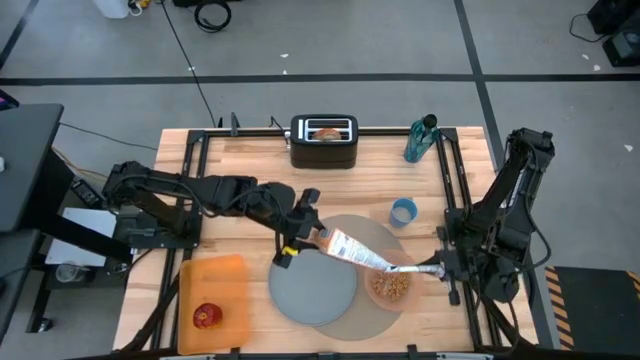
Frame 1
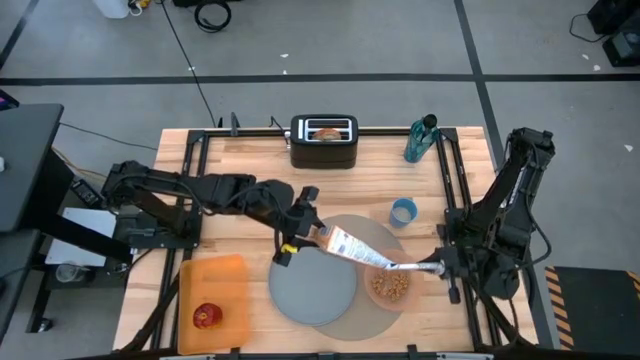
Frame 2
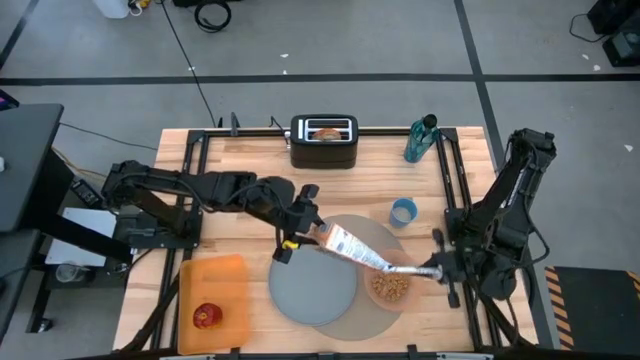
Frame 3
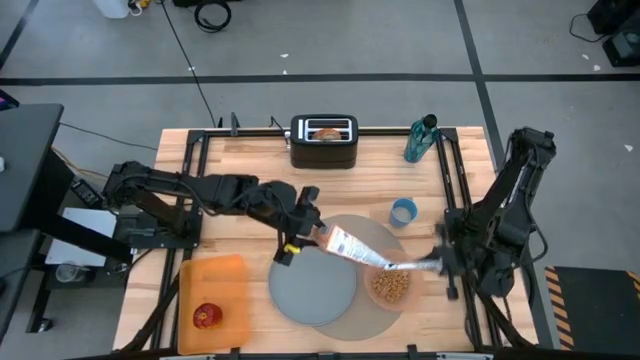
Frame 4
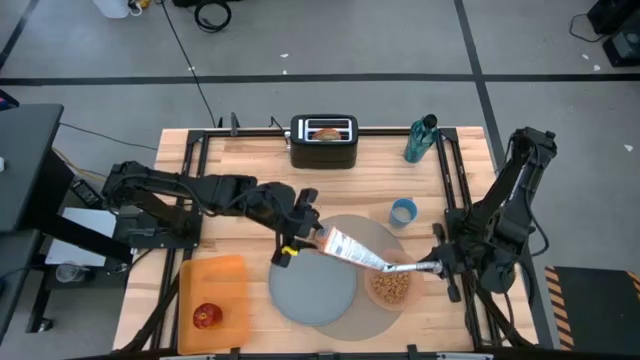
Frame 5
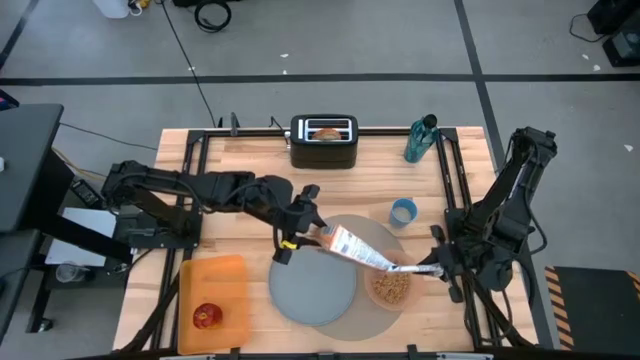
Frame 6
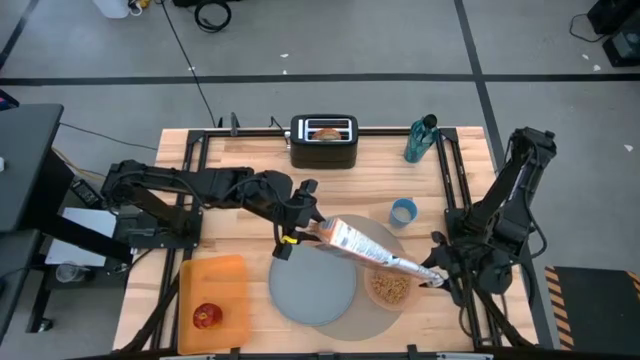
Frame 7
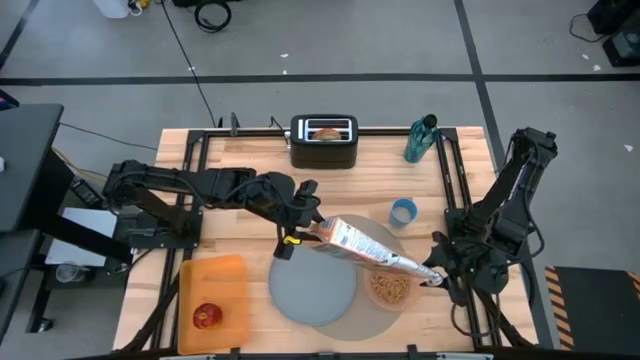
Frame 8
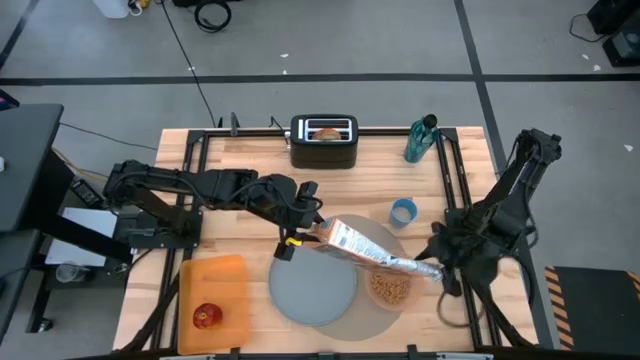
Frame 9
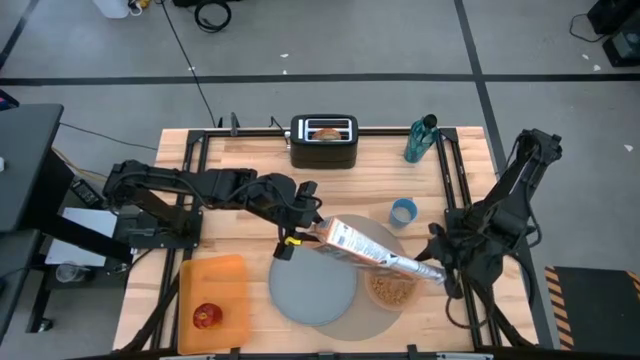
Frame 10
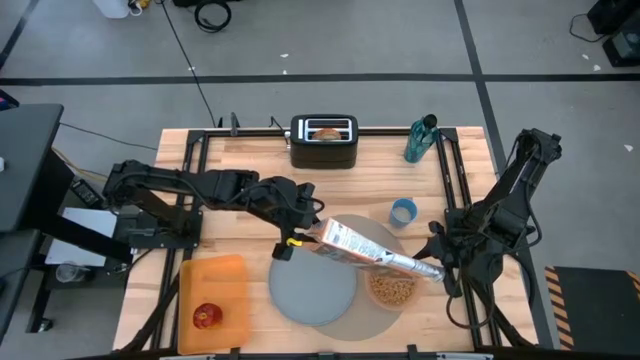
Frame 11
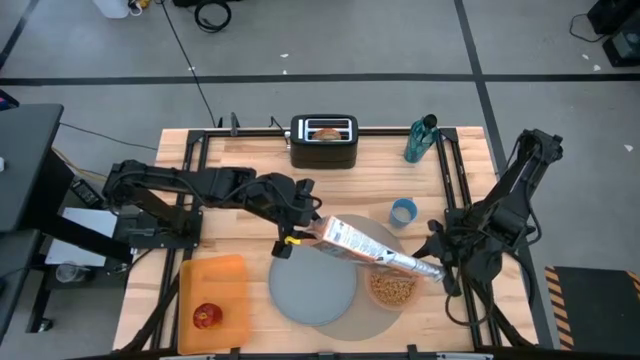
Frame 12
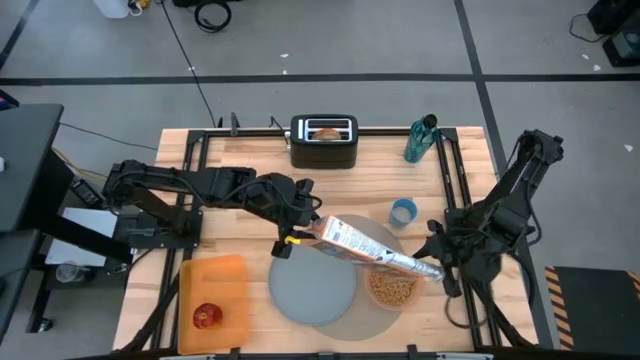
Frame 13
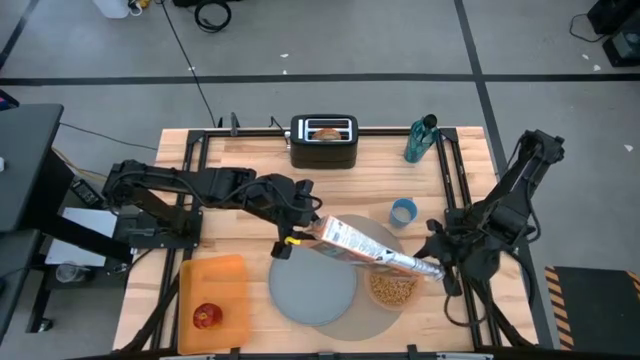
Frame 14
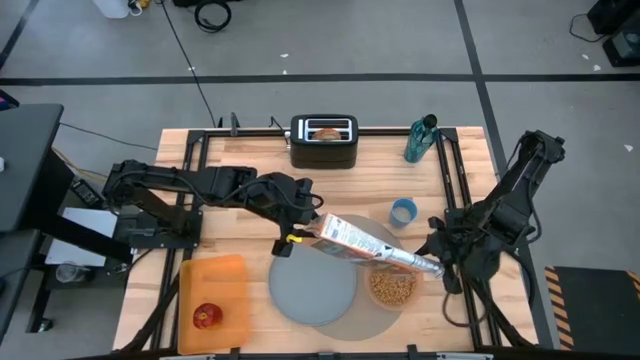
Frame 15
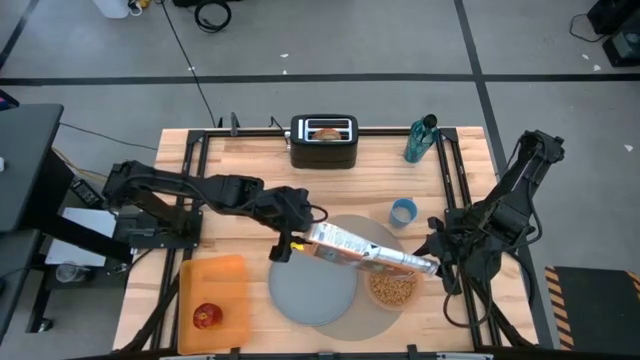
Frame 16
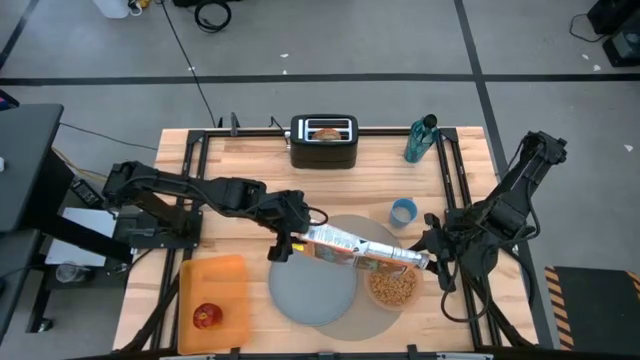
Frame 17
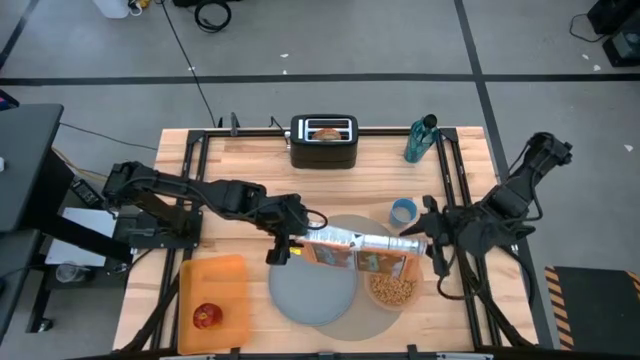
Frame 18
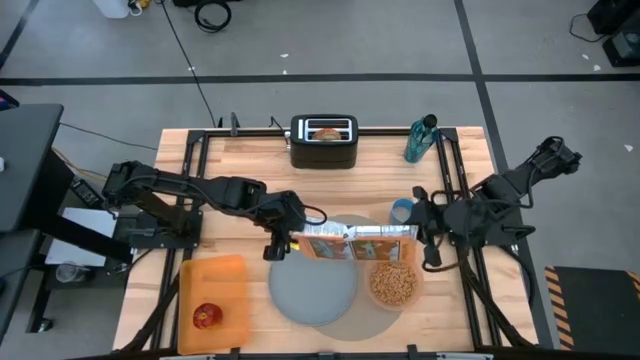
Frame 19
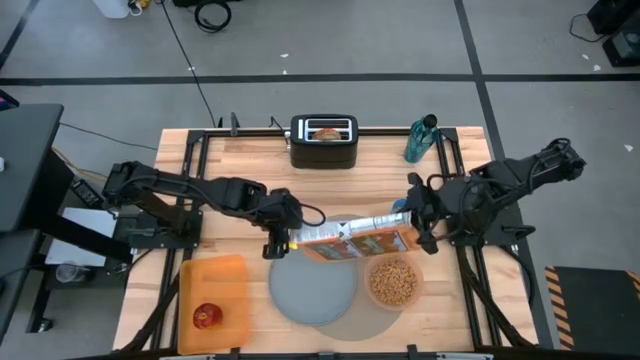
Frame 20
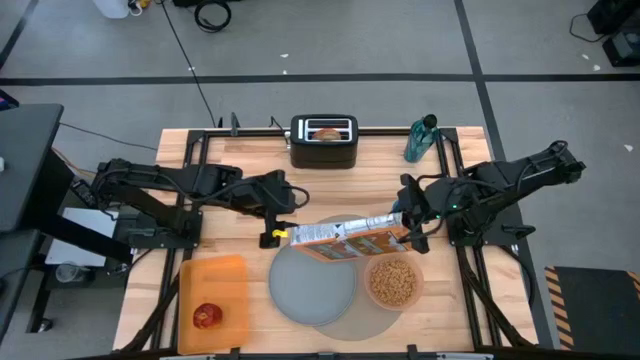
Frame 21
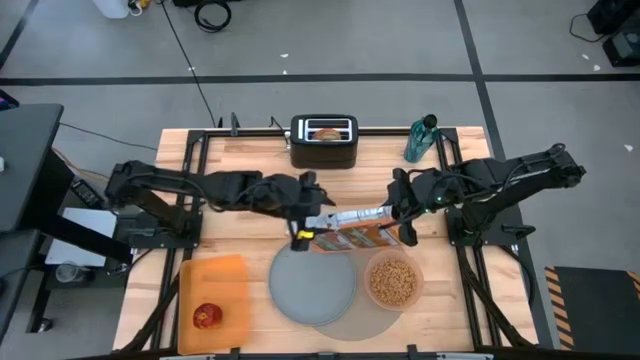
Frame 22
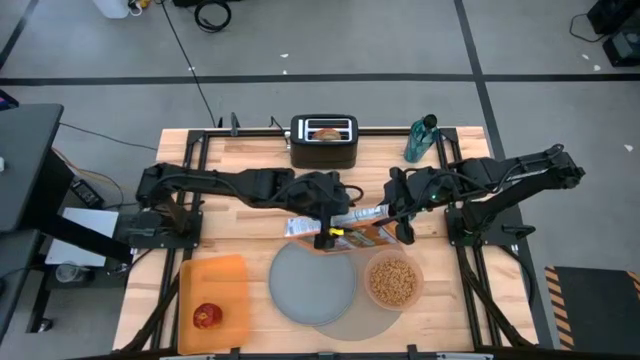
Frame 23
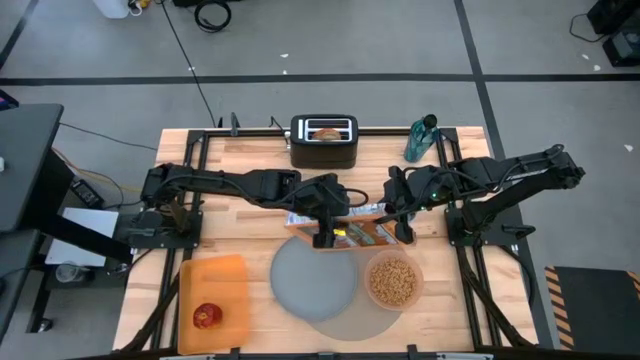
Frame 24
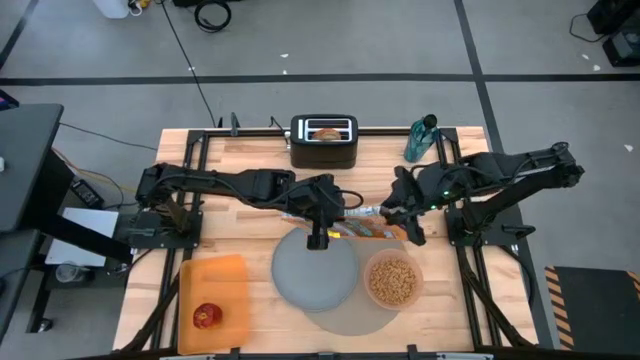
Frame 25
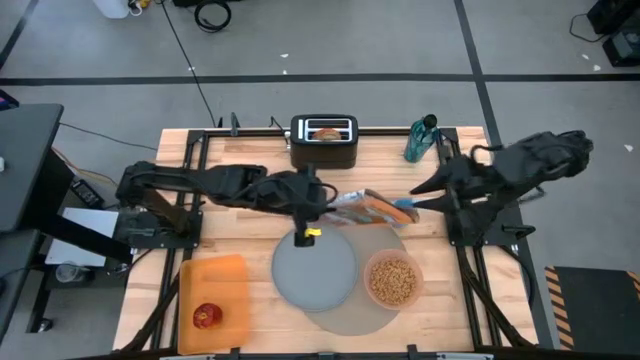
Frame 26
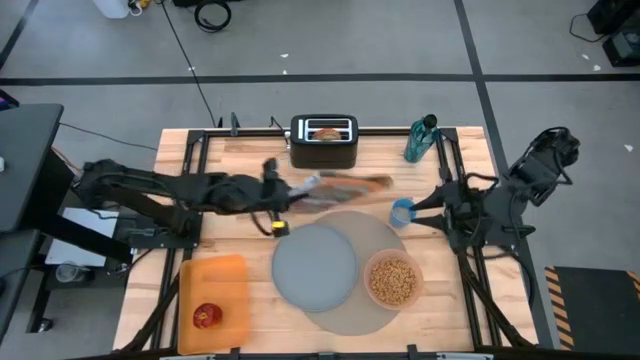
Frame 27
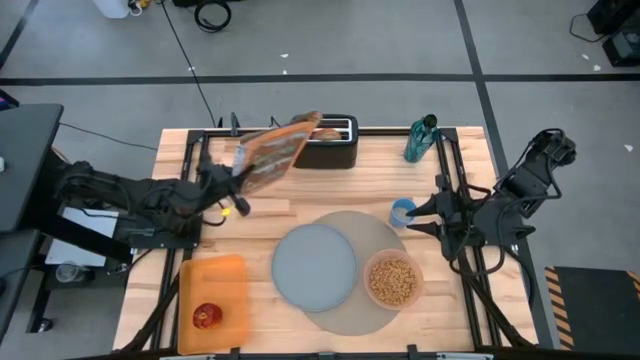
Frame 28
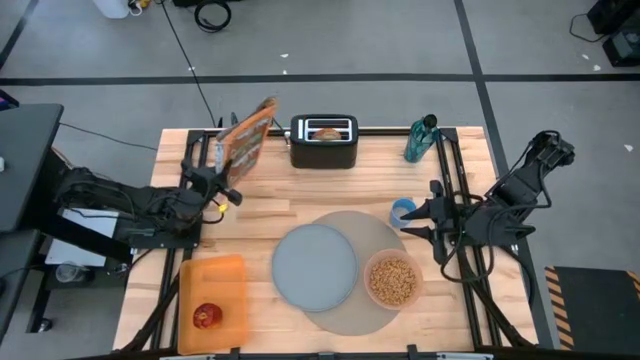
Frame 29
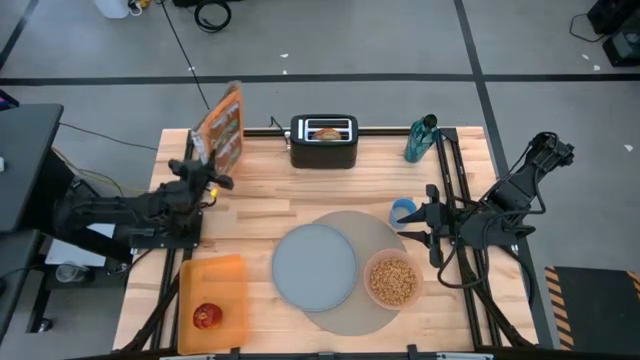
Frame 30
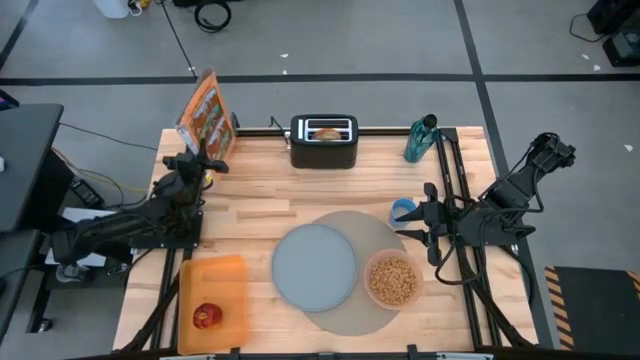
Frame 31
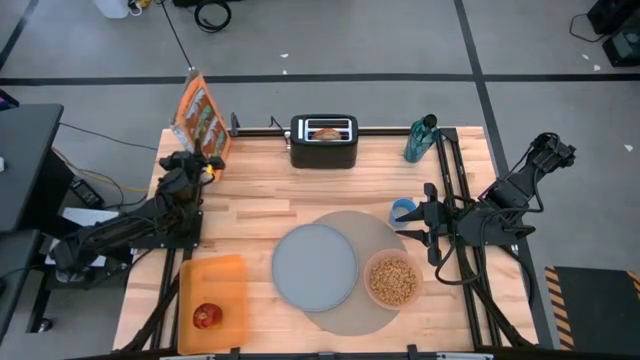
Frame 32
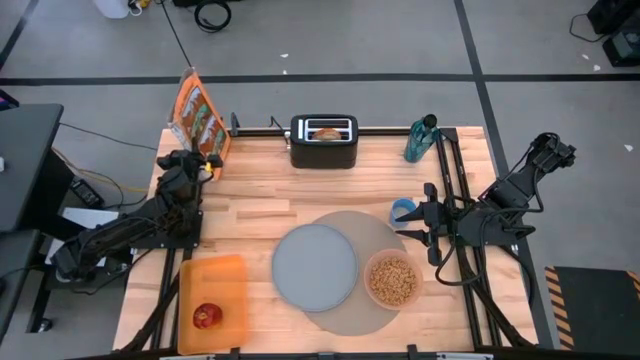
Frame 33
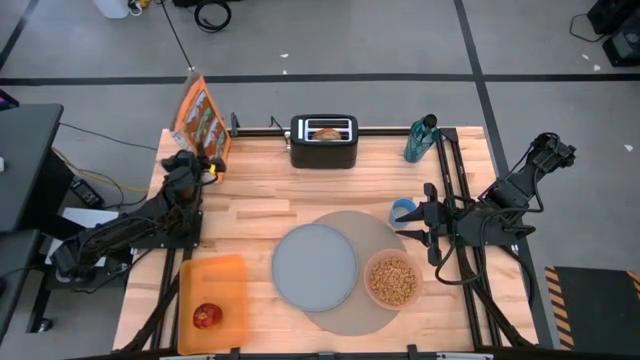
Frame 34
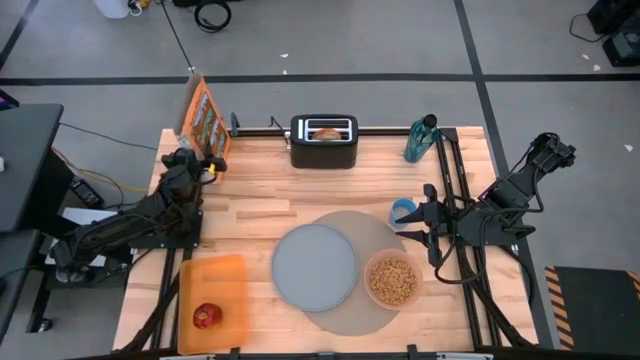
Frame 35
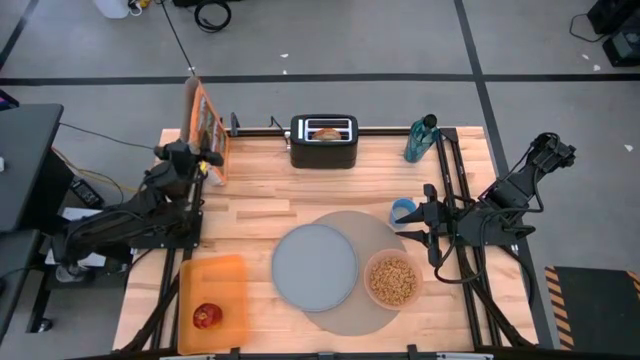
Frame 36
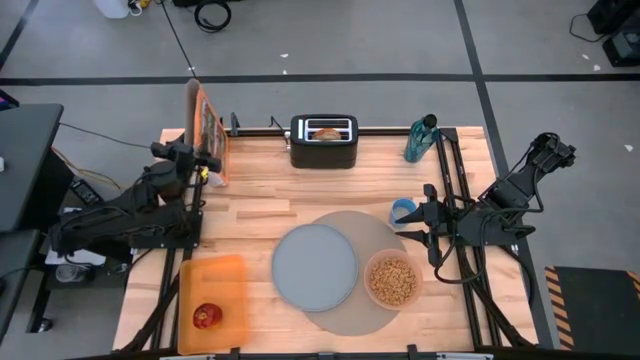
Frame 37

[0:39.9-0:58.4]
Task: Arrange a breakfast setting
Pour cereal into the orange bowl

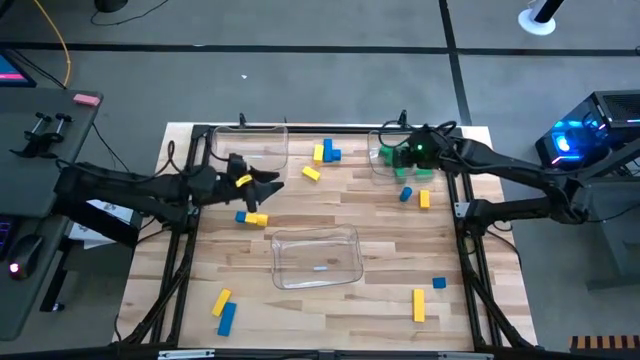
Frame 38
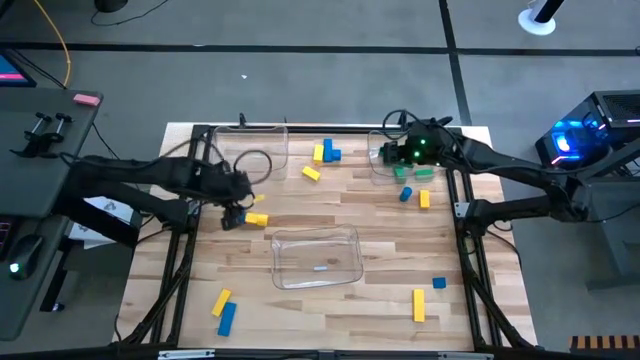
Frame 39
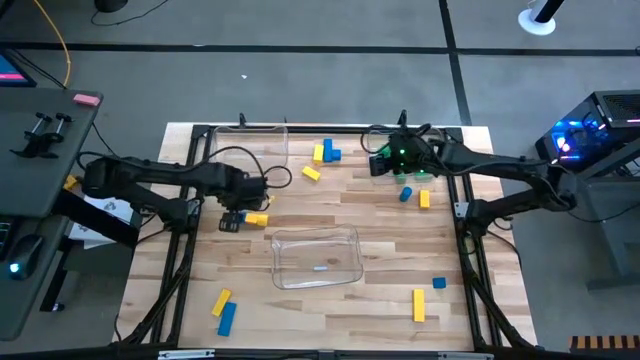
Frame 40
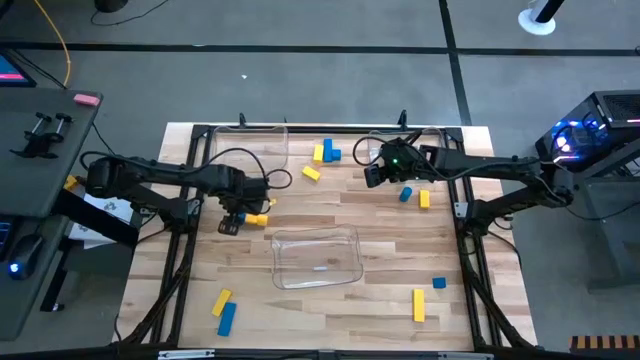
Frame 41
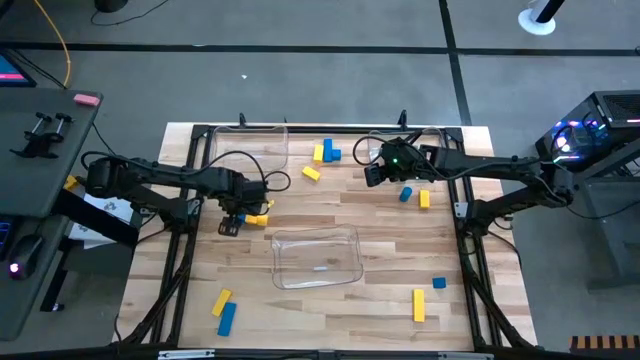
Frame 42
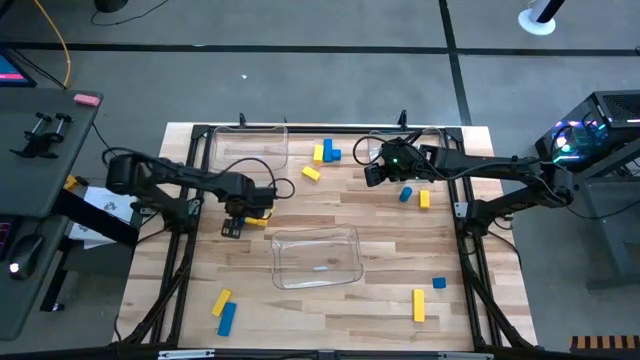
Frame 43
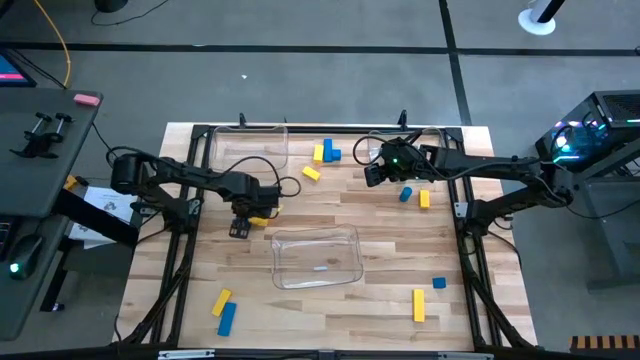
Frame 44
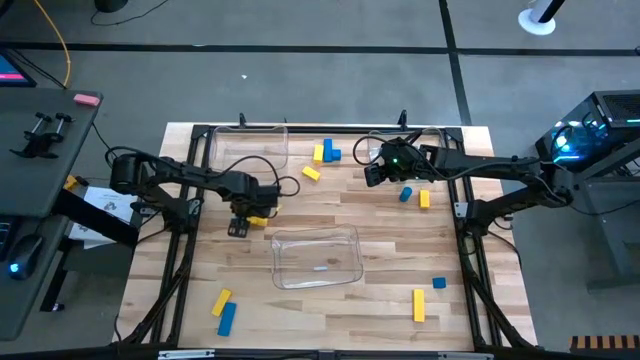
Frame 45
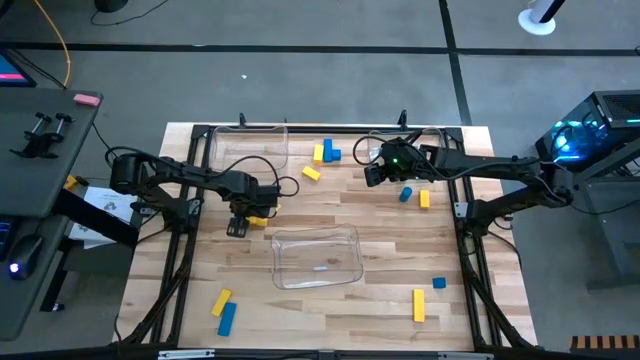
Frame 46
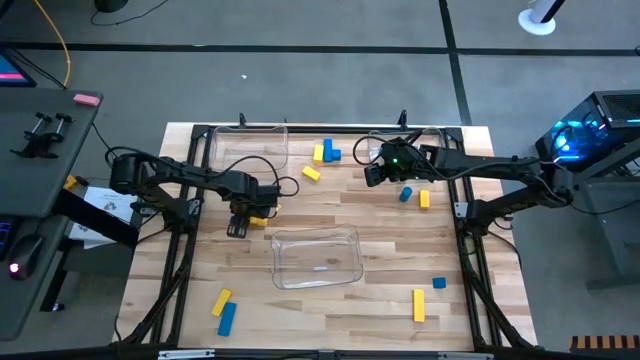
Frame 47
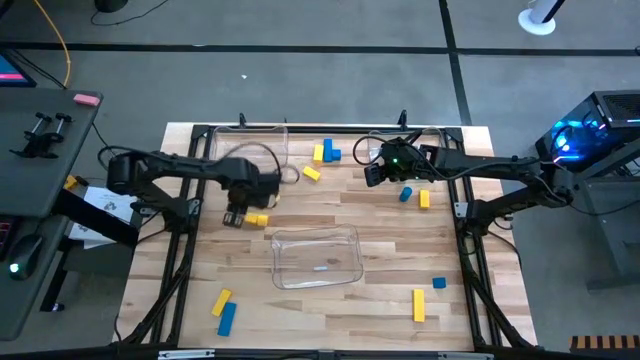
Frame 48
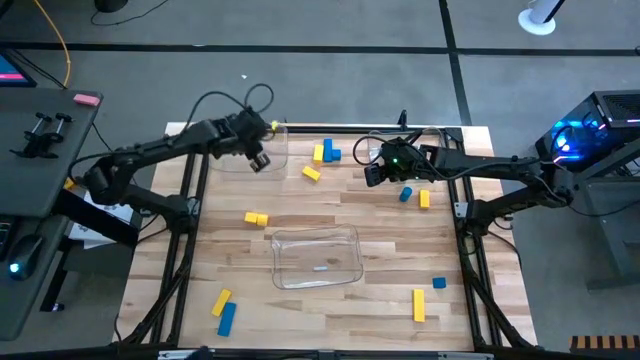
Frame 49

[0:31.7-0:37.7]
Task: Sort blocks
Put the blue block into the top left transparent bin
